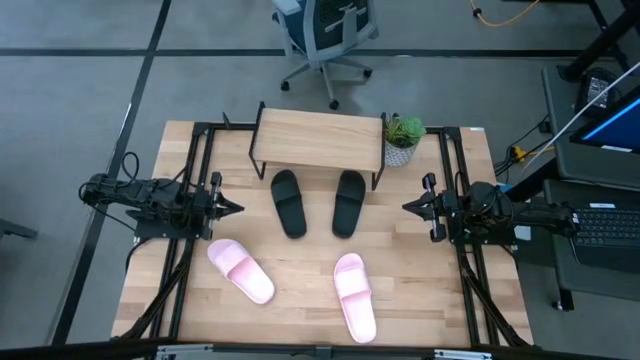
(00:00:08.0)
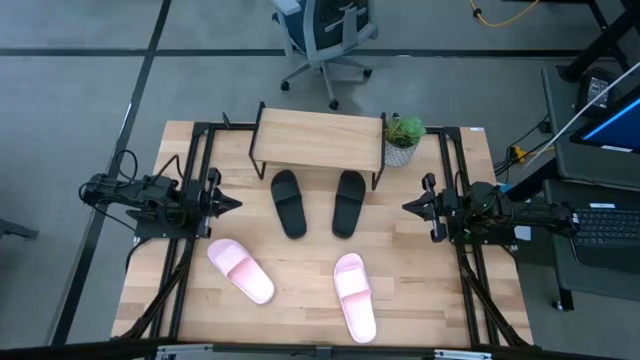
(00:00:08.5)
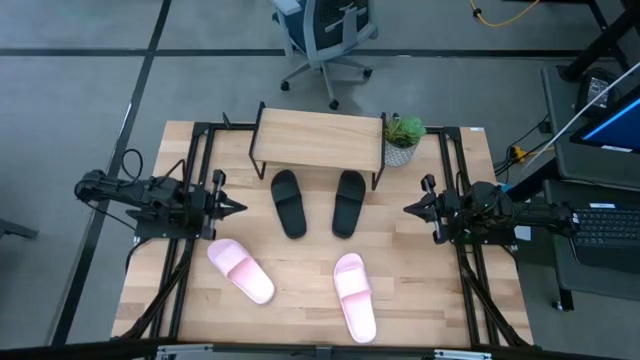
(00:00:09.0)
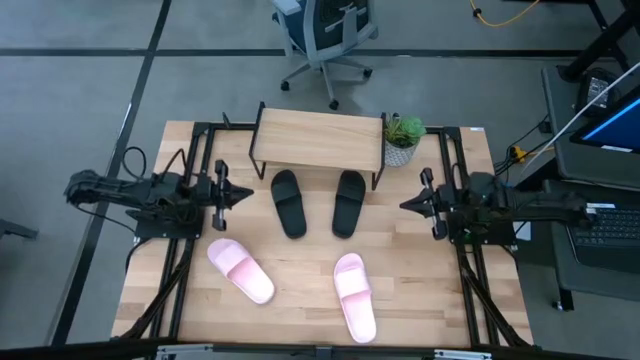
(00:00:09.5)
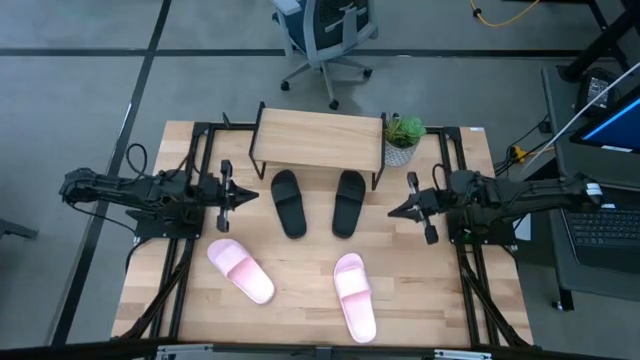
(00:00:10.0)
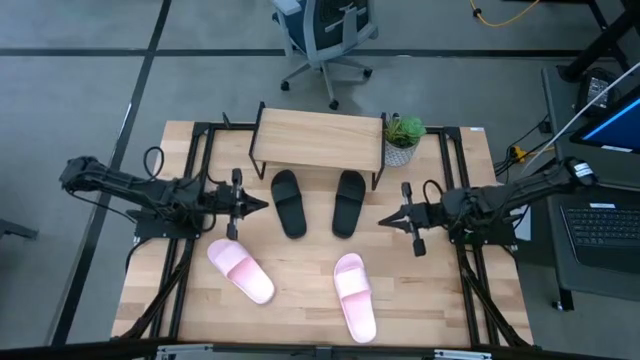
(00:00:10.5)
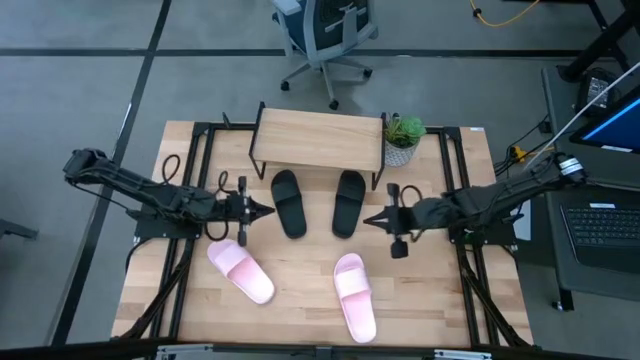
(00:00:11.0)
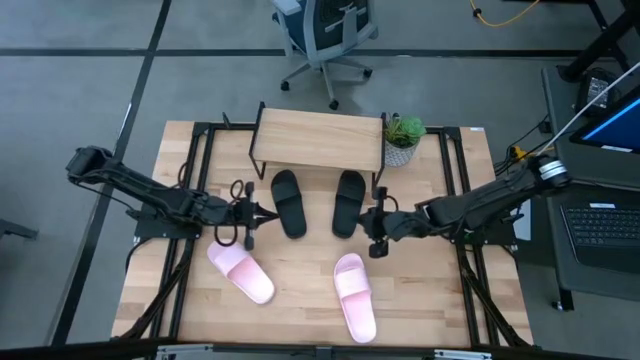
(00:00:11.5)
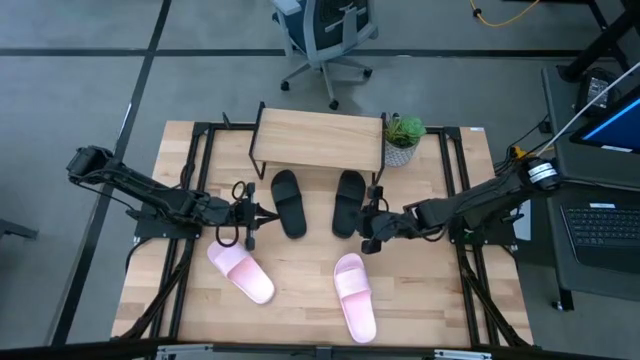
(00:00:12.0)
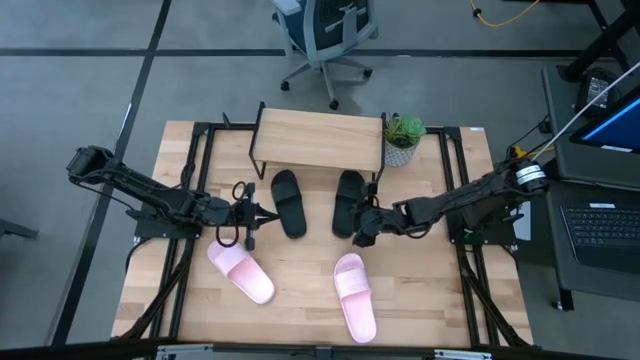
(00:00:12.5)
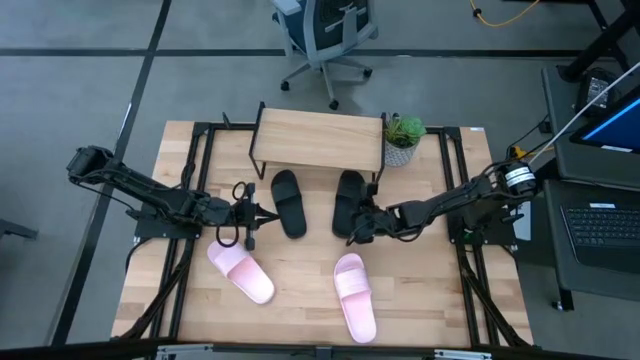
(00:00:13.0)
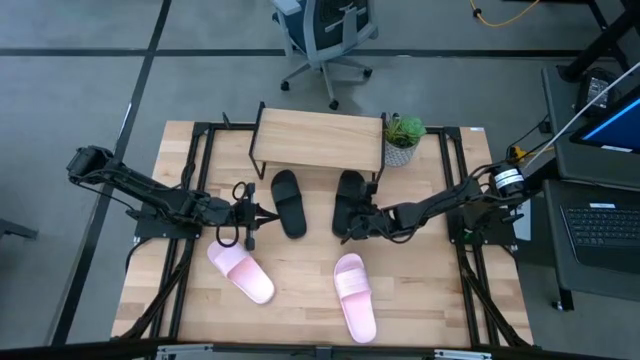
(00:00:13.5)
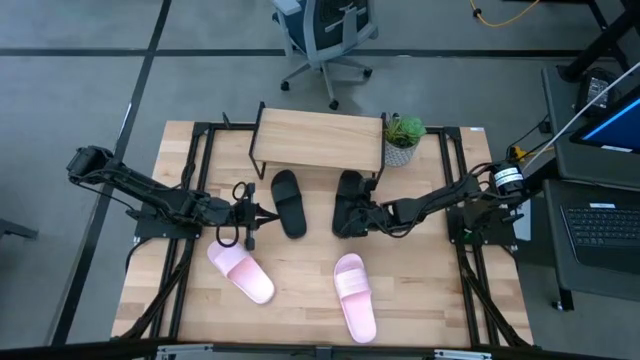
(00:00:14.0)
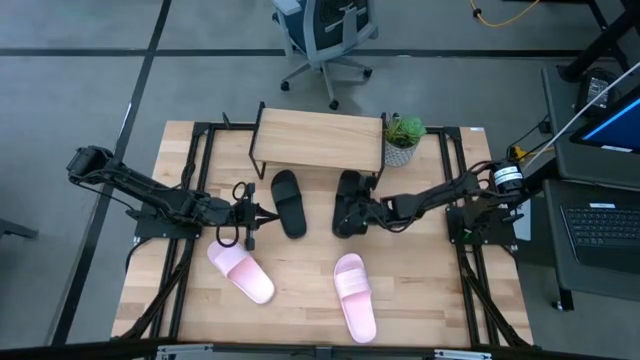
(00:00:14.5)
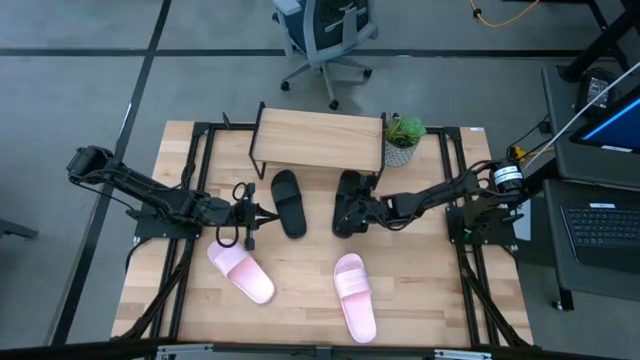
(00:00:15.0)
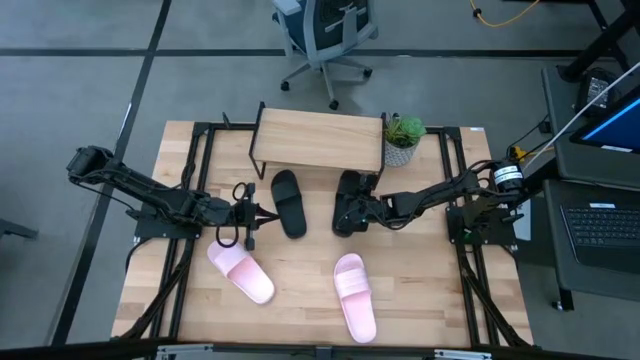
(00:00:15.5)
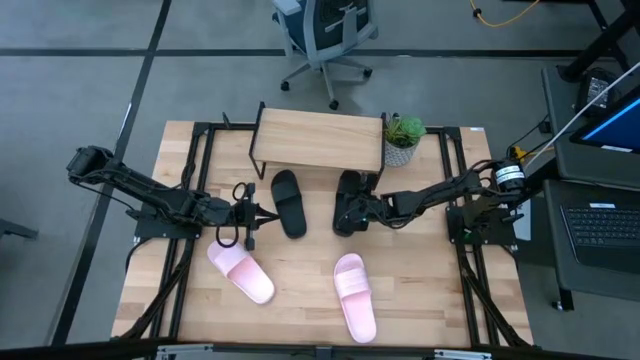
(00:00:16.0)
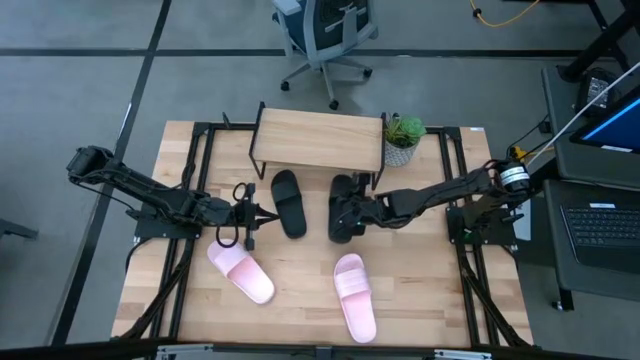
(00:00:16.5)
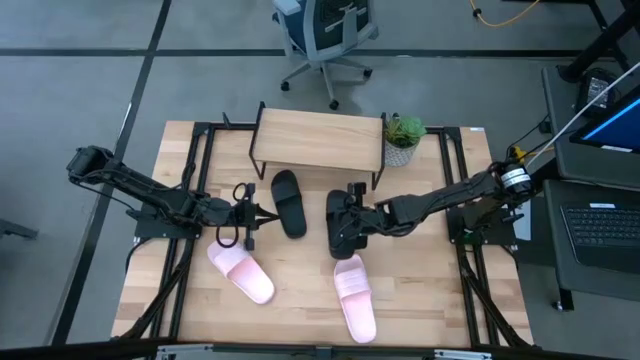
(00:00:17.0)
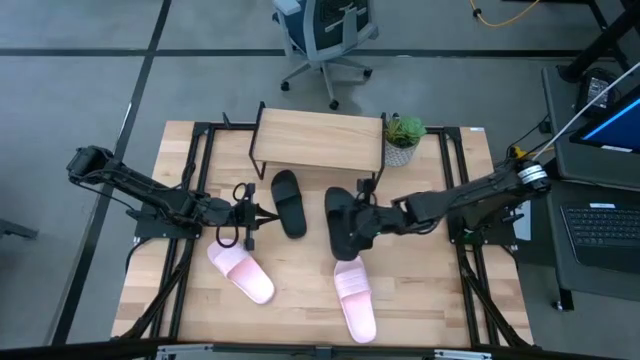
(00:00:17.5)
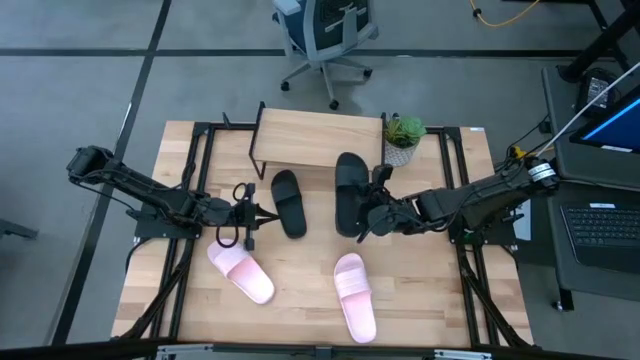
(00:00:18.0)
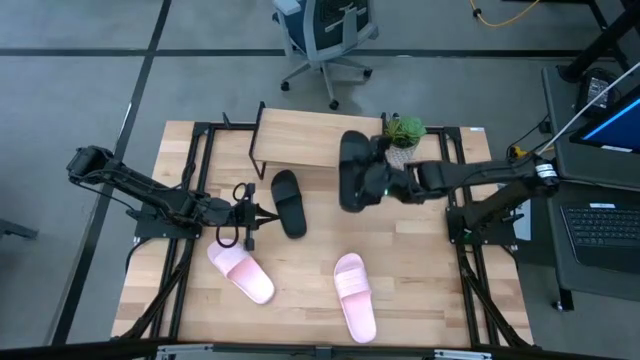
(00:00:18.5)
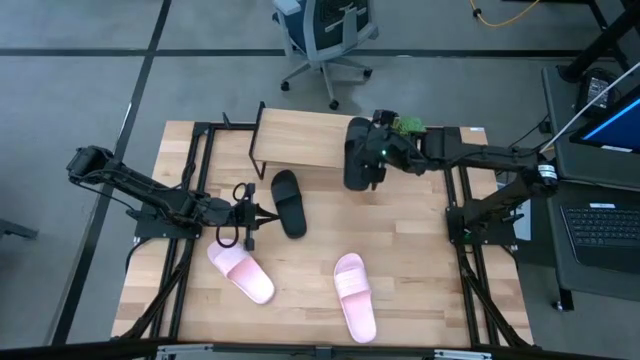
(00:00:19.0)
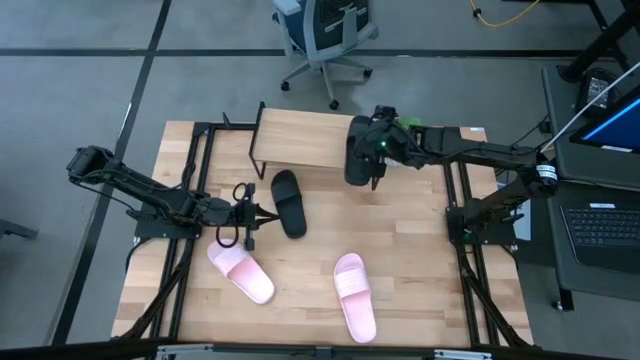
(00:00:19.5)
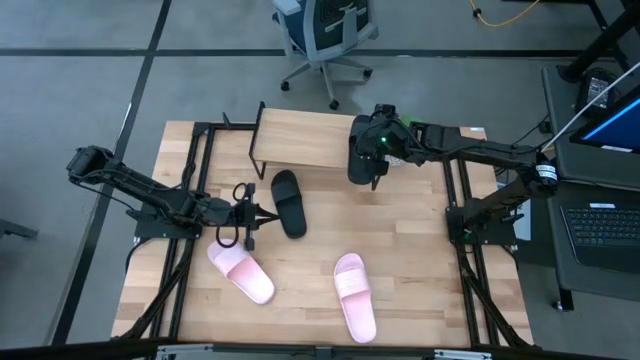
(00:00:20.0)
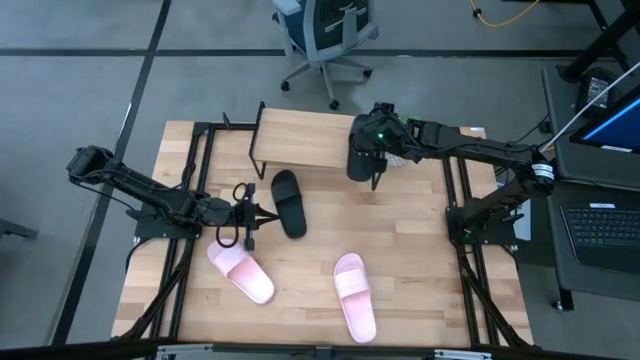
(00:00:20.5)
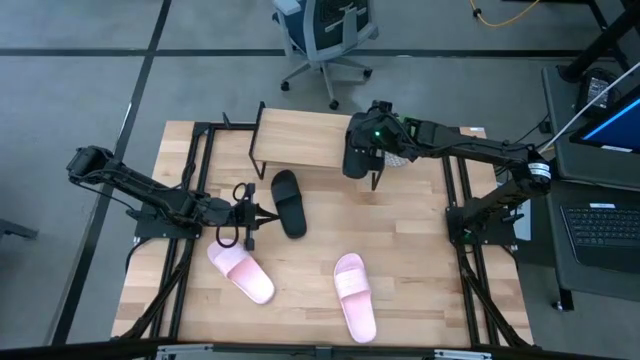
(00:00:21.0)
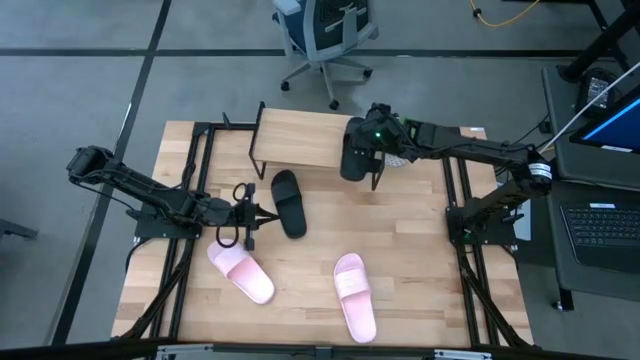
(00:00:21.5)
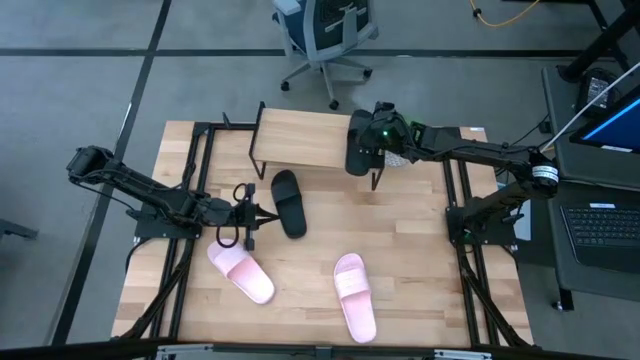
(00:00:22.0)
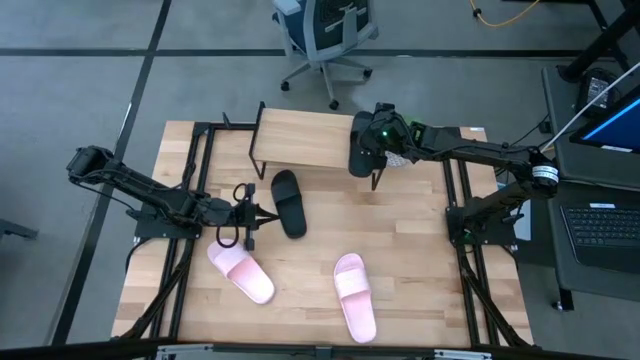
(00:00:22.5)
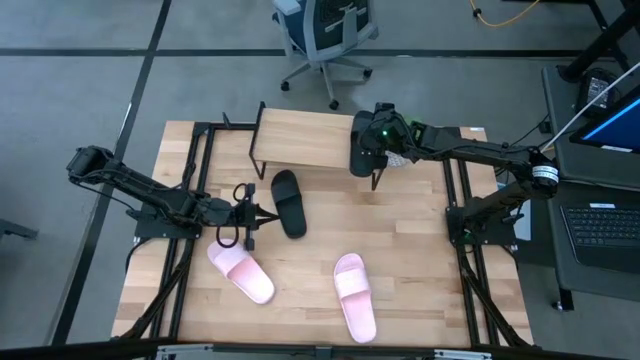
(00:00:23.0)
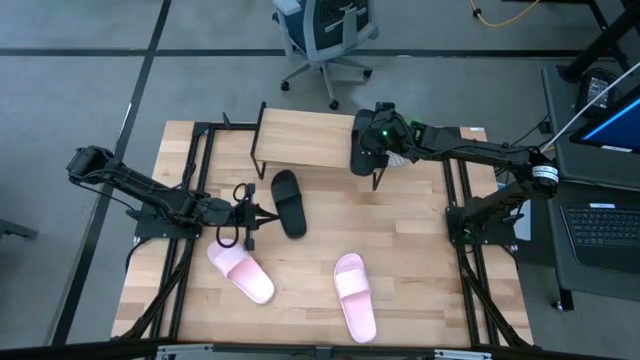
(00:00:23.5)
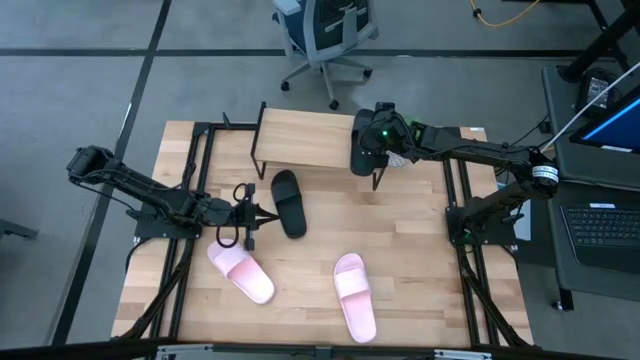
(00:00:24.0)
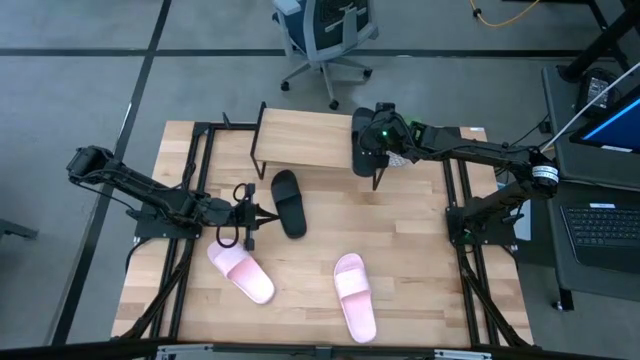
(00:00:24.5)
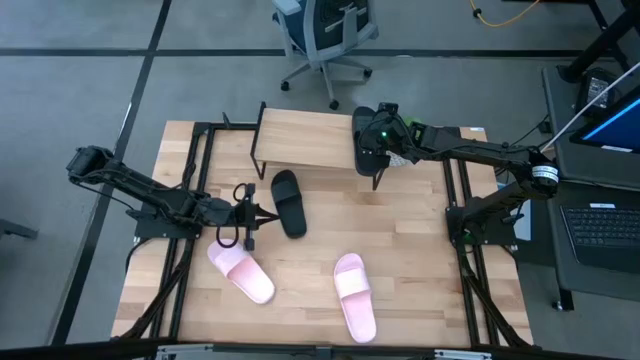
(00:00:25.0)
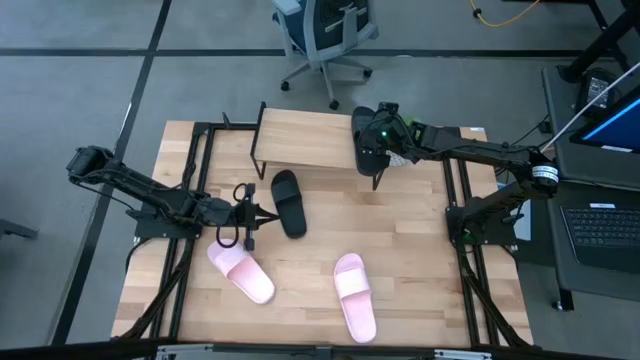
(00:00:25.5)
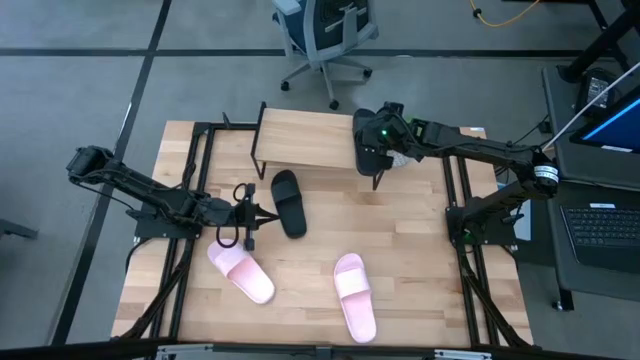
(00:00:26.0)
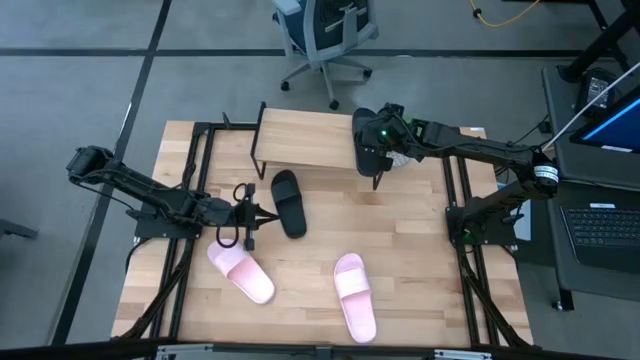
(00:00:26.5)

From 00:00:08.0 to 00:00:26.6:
Task: Pick and place slides into the shelf
Put the right black slides on the shelf

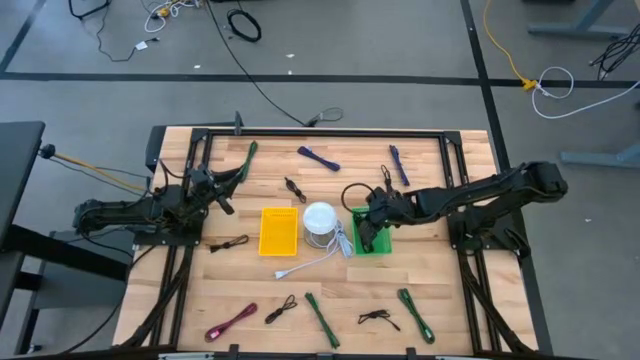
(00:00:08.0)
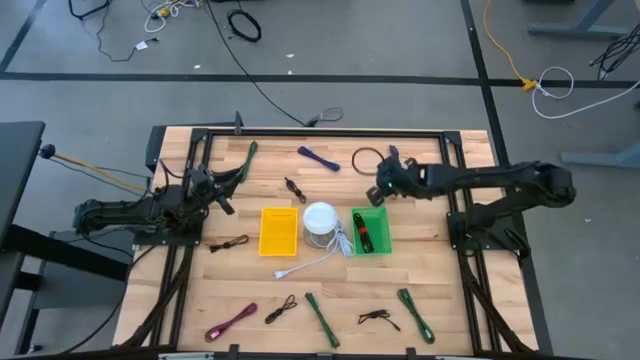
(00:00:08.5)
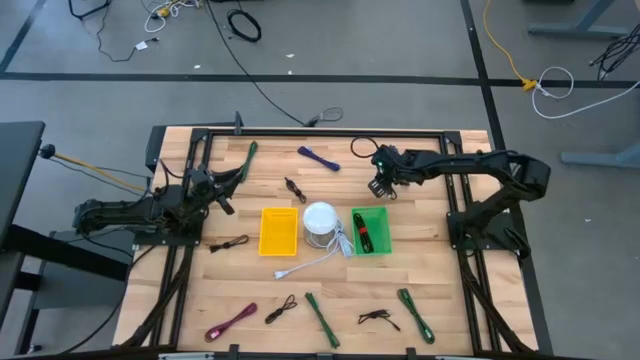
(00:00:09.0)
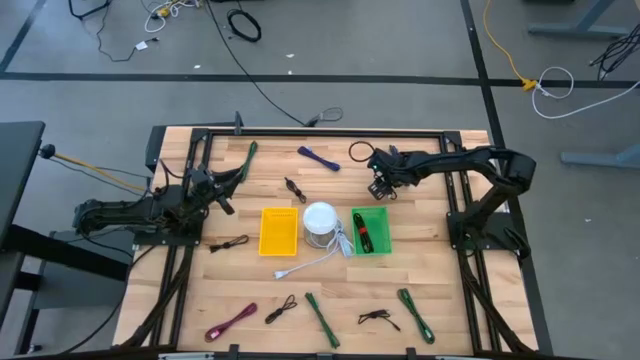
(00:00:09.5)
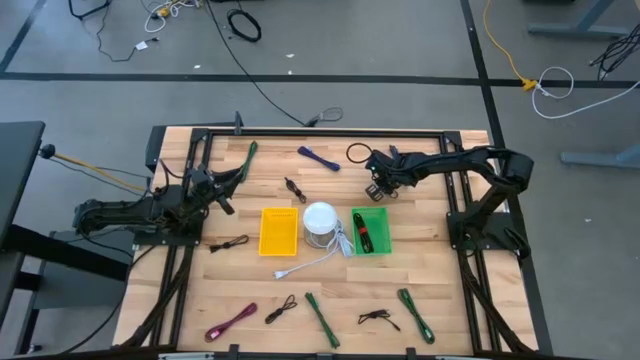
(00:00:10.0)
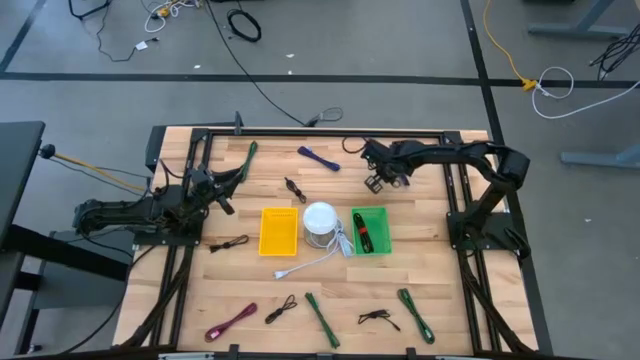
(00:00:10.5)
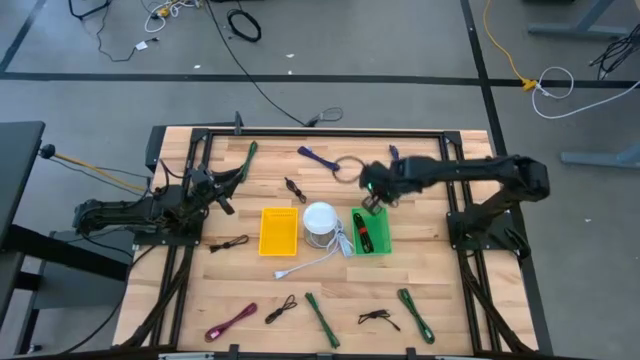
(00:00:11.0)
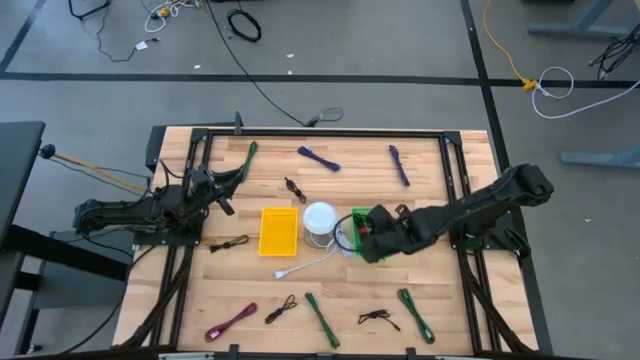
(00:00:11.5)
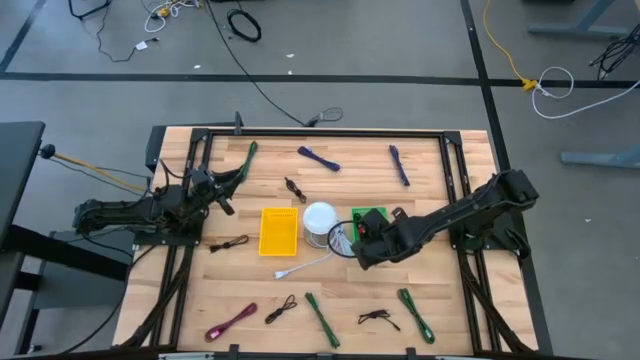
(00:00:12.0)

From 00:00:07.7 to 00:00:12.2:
Task: Pick & Place USB Port
Put the black charger cable into the green basket
